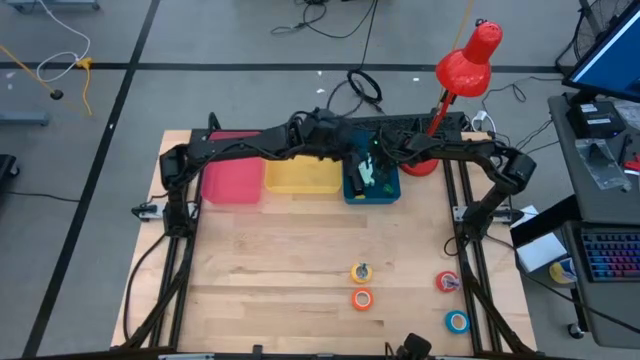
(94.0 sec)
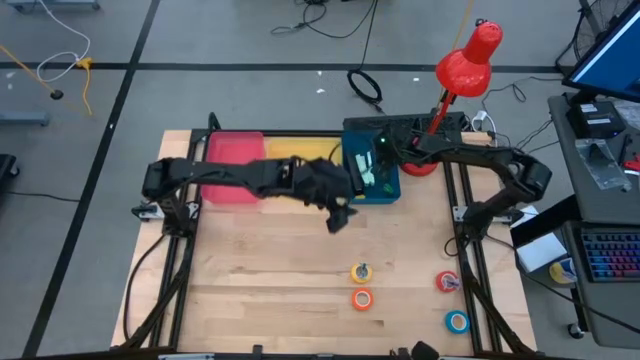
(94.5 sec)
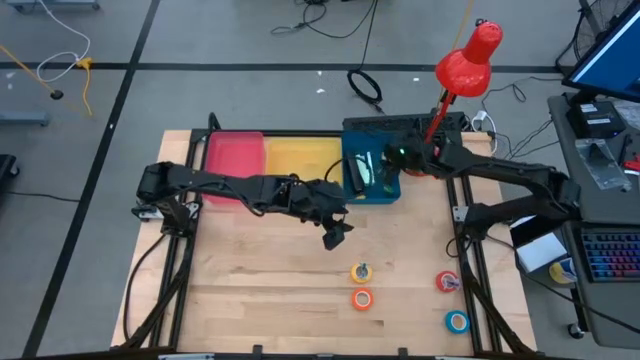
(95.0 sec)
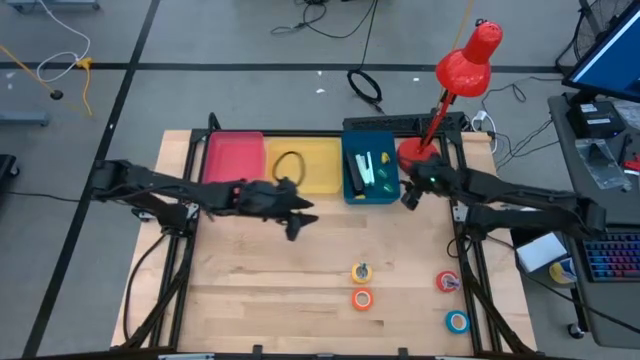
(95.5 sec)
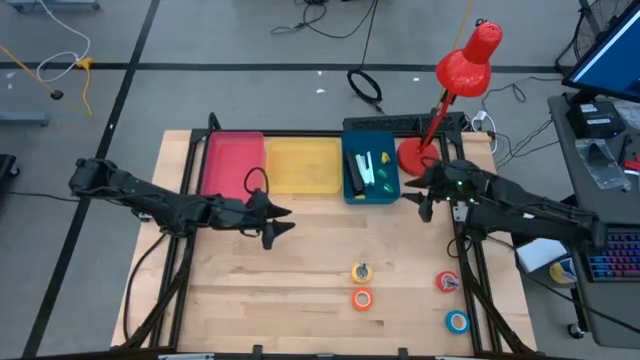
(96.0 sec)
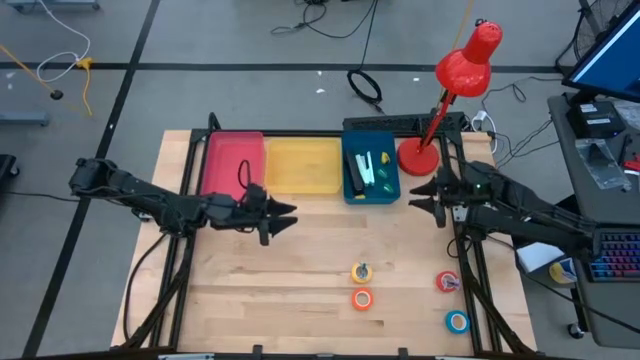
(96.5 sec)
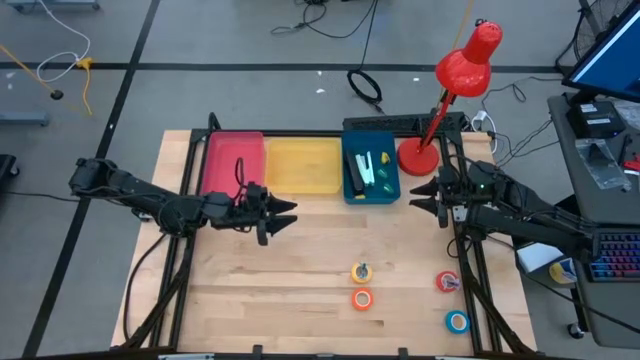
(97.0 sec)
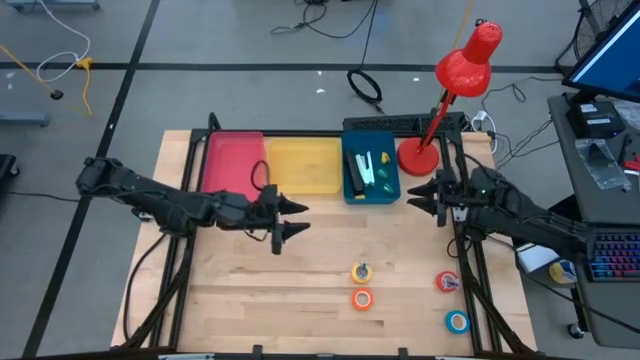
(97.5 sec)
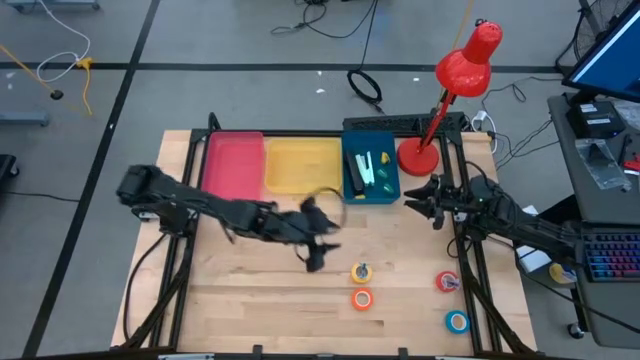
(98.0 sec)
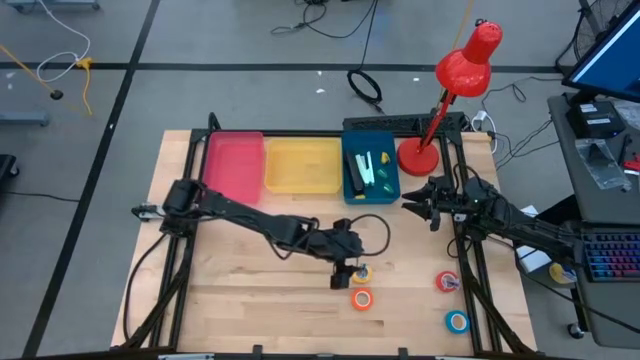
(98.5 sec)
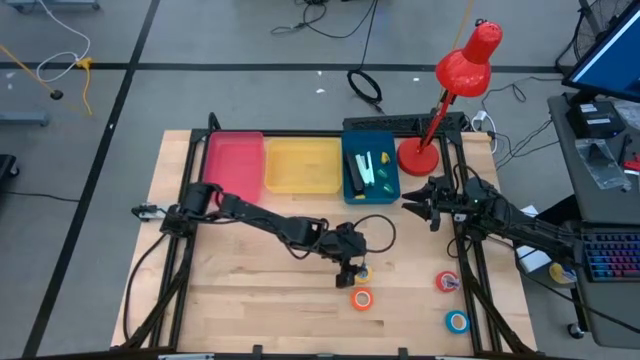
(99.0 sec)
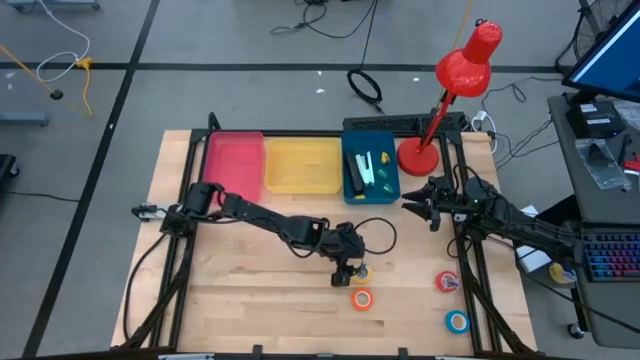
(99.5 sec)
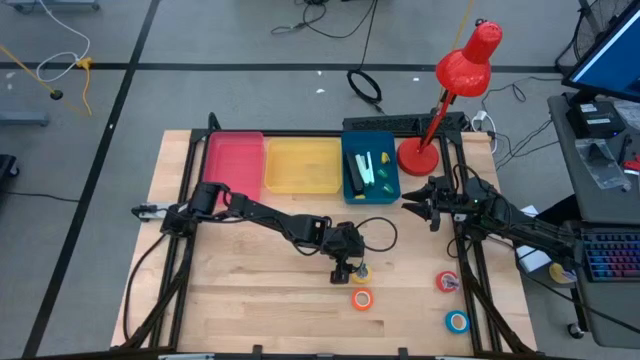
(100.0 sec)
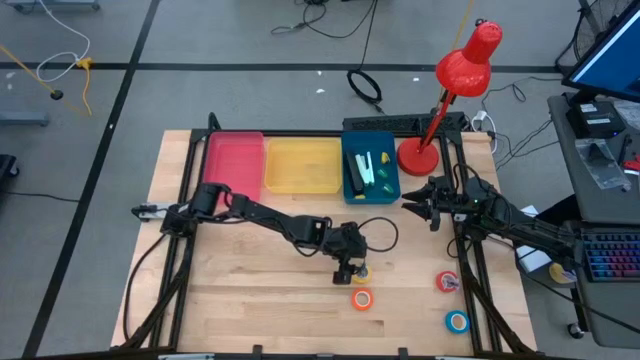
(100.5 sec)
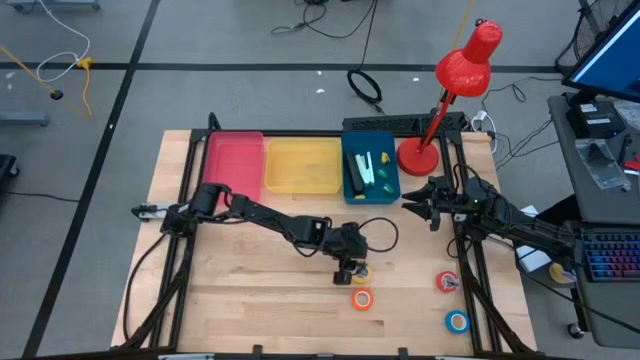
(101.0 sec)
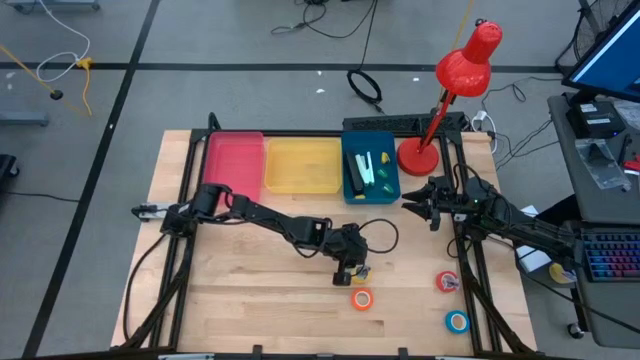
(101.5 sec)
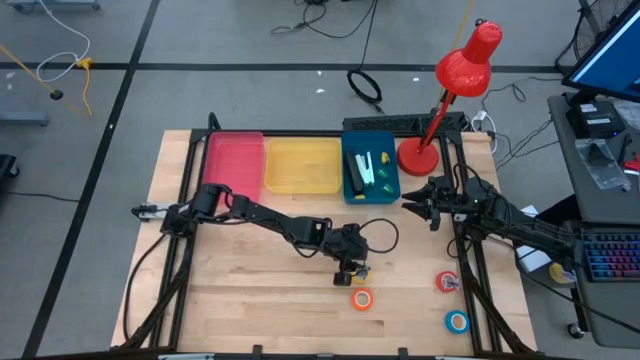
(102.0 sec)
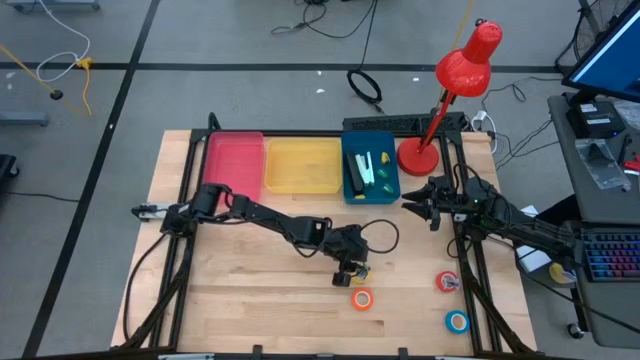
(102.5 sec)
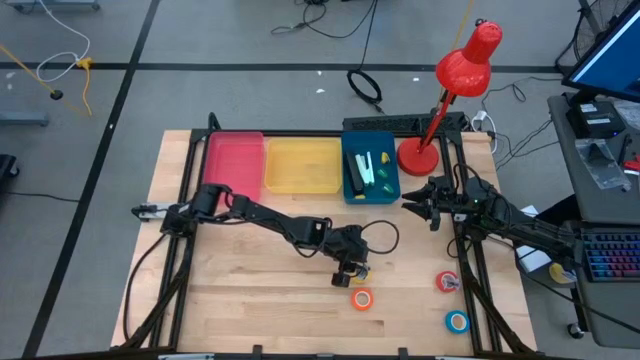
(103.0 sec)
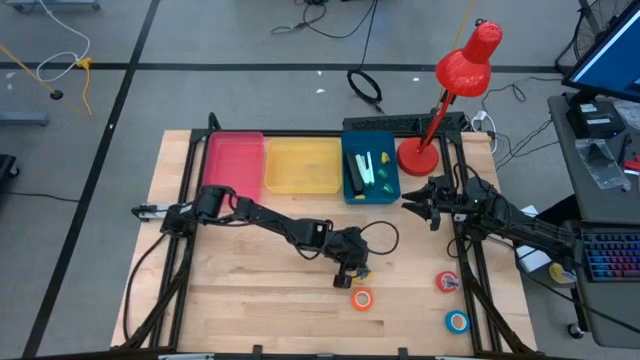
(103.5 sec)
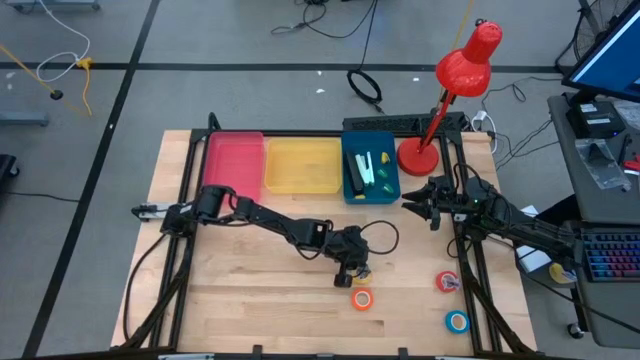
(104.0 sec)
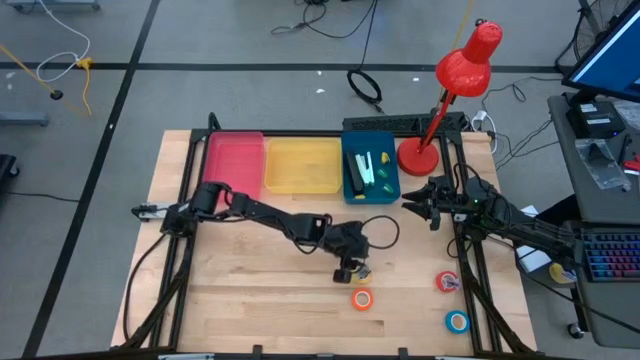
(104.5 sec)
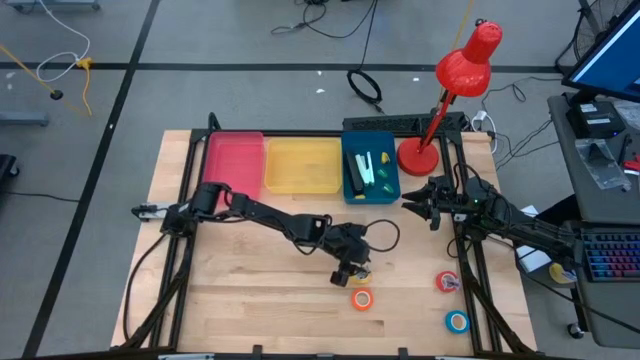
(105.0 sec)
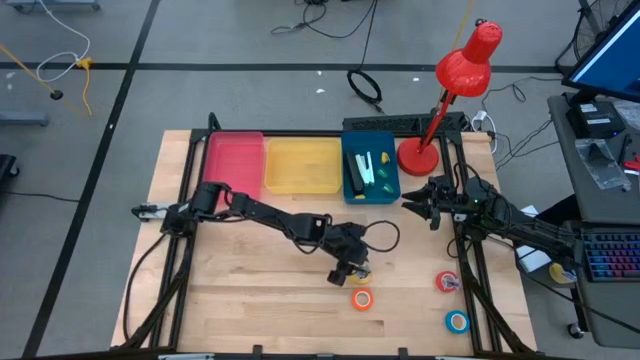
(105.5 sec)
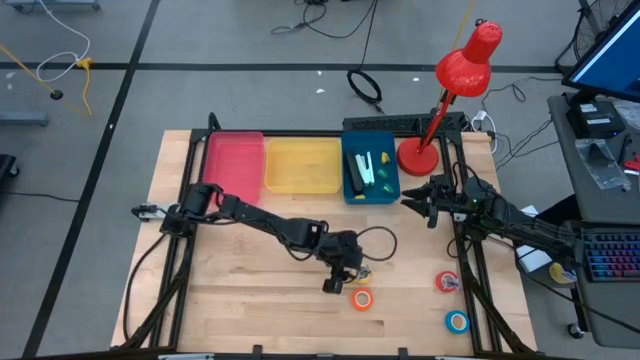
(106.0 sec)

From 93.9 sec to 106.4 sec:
Task: Pick and place Stapler, Stapler remover, tape
Put the blue stapler remover into the red bin

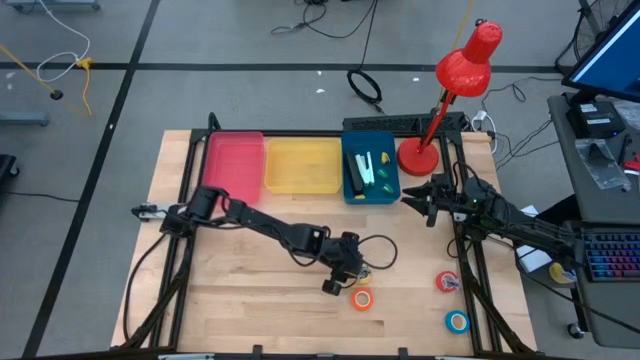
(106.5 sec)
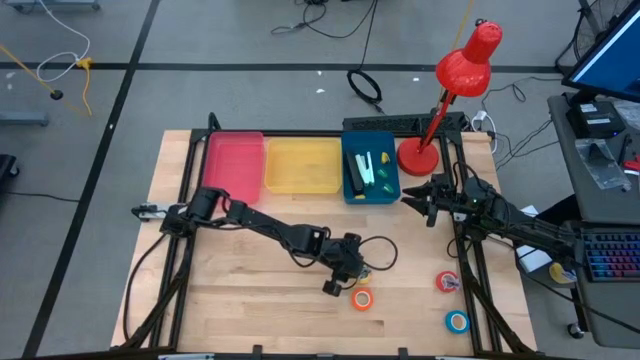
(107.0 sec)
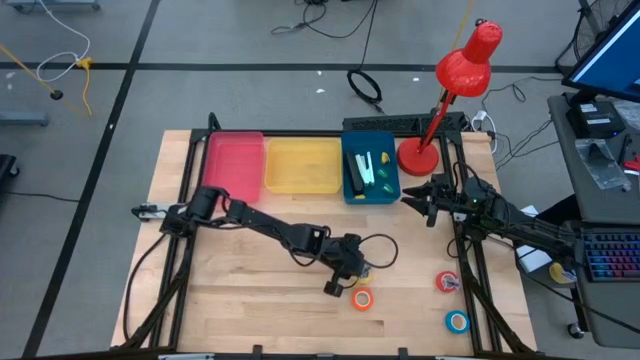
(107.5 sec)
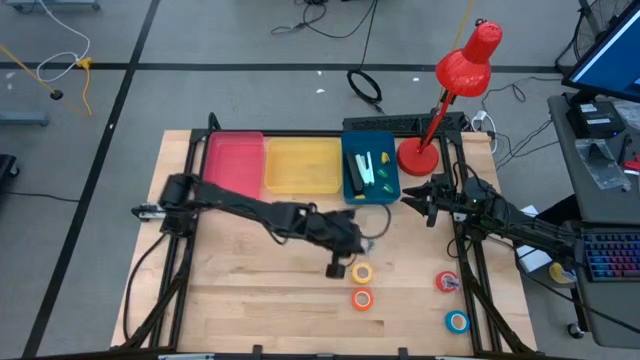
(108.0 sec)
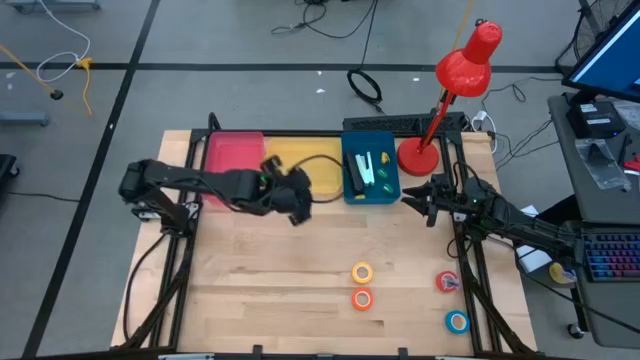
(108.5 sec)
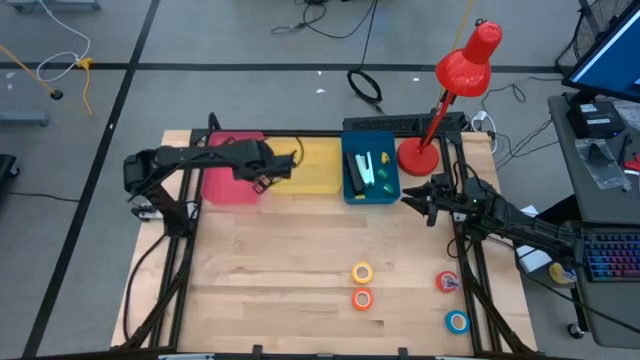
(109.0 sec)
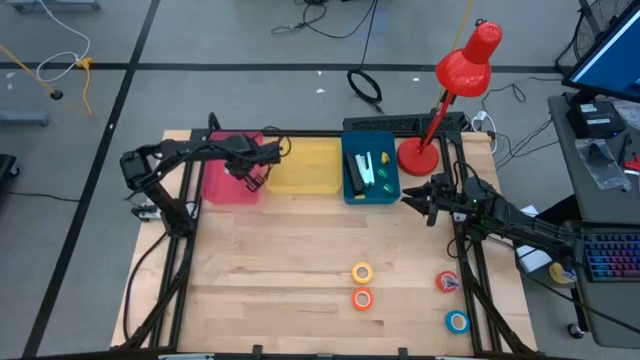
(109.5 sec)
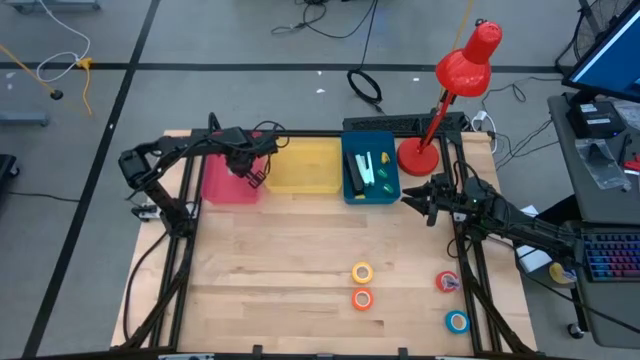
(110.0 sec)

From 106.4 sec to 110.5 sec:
Put the blue stapler remover into the red bin

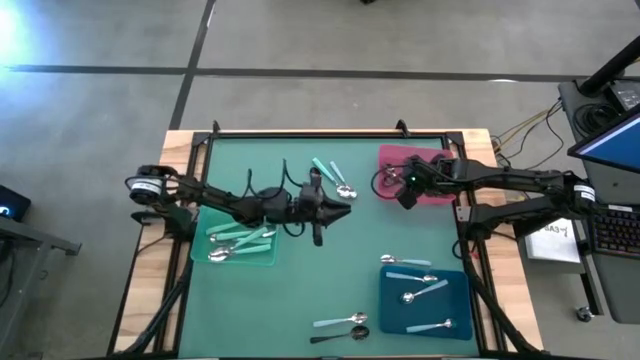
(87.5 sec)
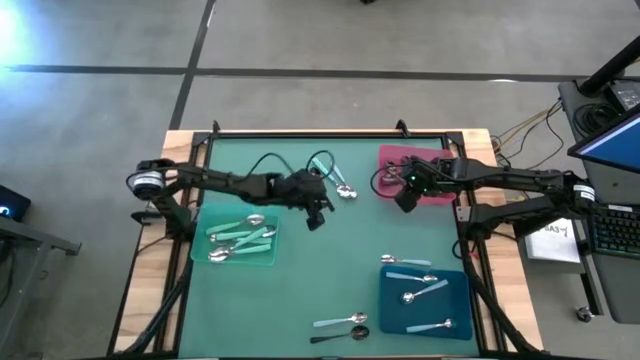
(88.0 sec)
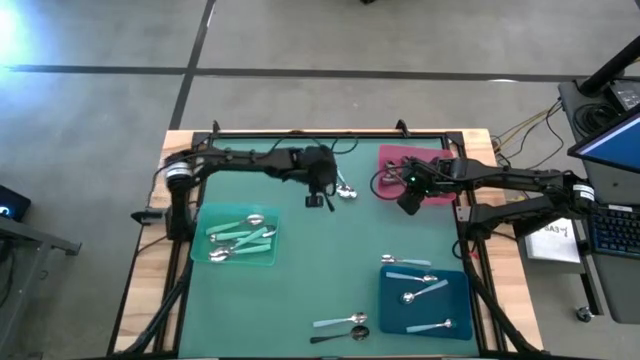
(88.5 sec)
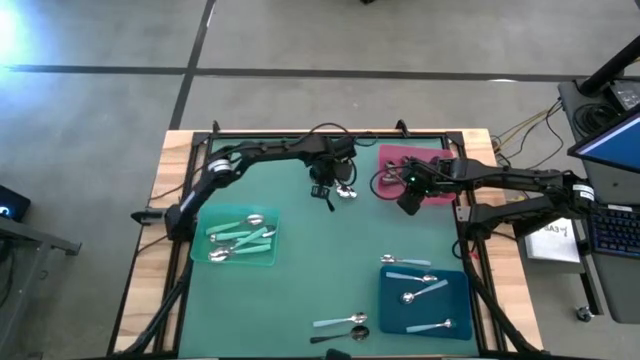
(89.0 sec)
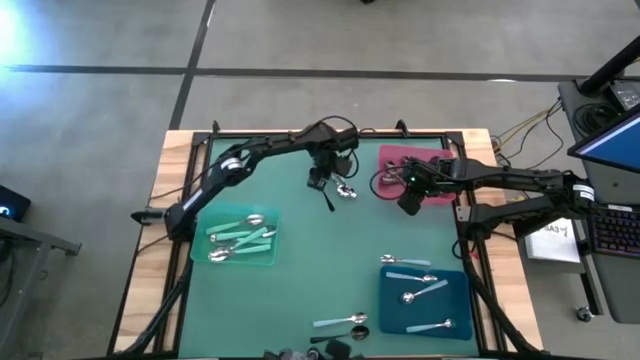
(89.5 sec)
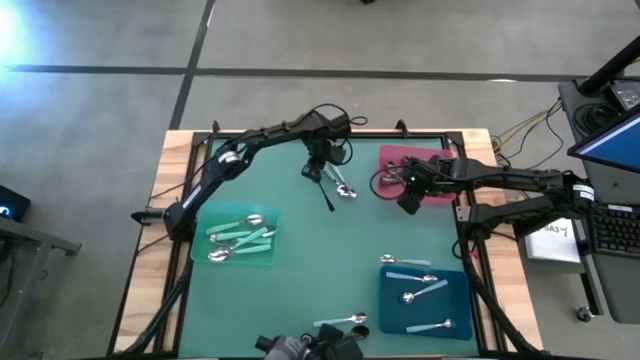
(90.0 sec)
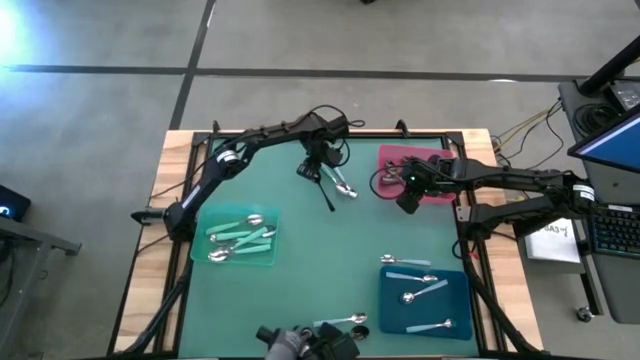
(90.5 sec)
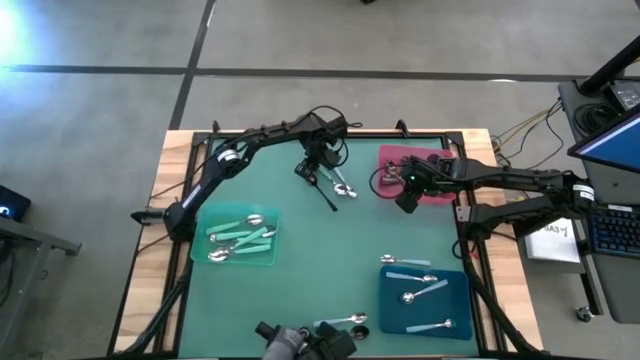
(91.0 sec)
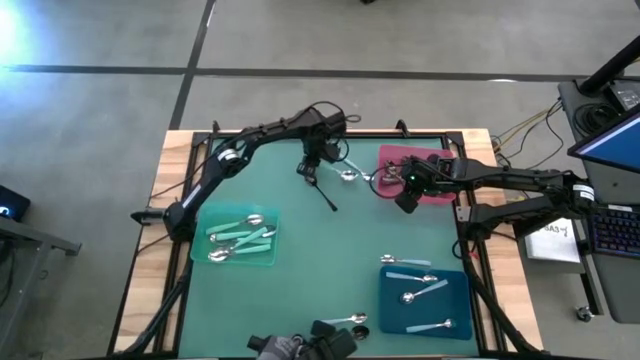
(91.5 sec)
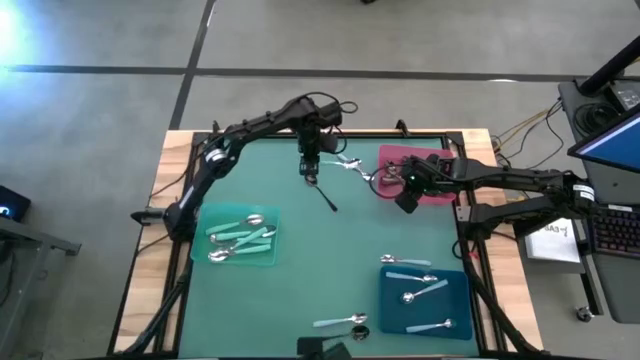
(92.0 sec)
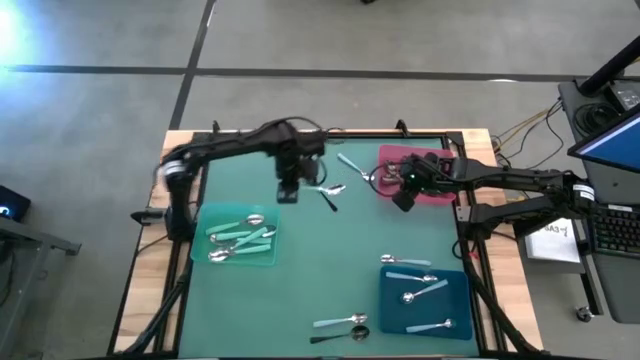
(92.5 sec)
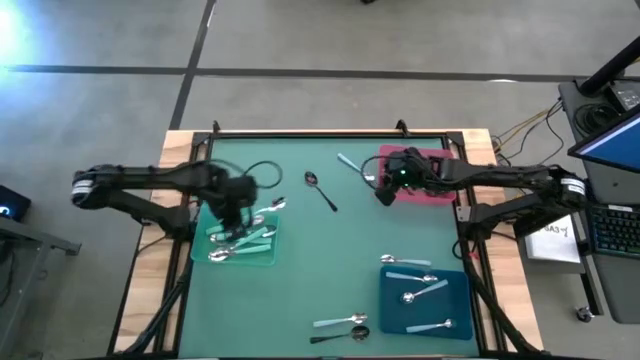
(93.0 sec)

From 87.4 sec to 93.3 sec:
Task: Sort silverware by color (type)
Put the green spoon into the green bin
